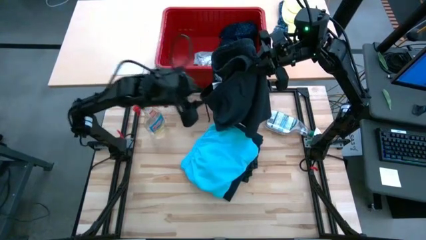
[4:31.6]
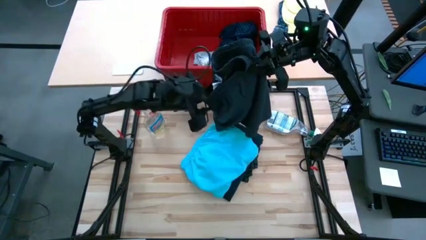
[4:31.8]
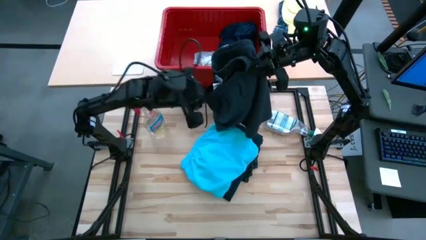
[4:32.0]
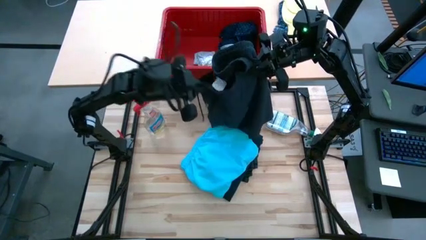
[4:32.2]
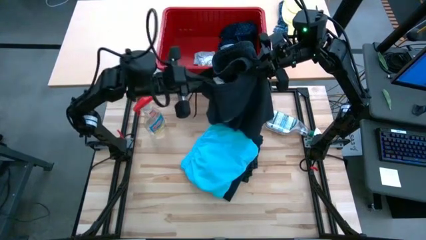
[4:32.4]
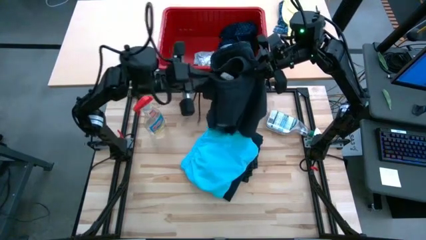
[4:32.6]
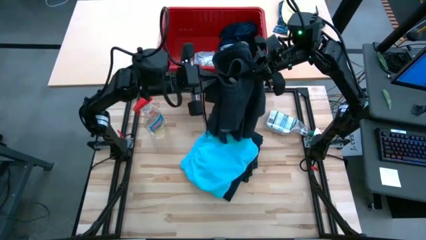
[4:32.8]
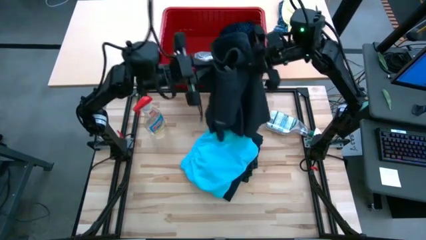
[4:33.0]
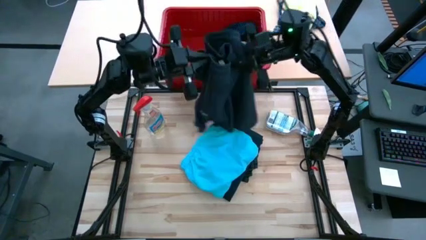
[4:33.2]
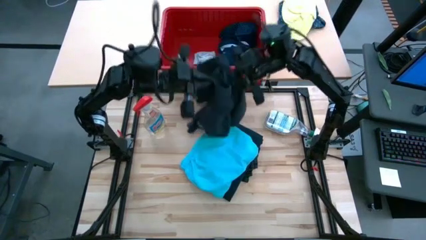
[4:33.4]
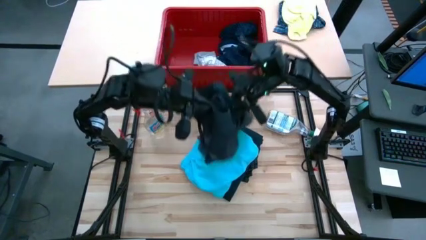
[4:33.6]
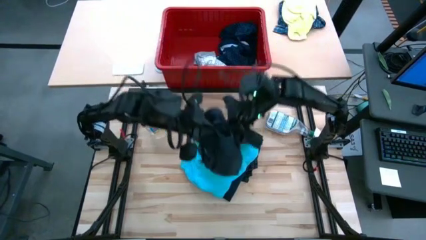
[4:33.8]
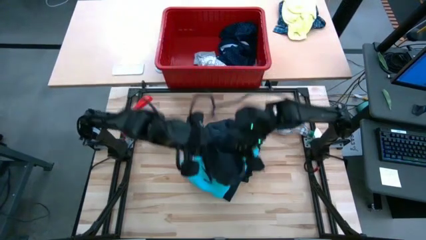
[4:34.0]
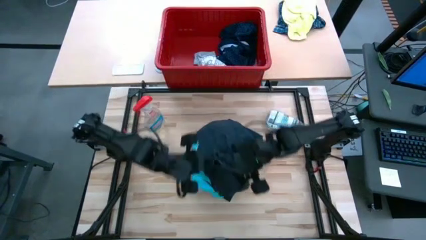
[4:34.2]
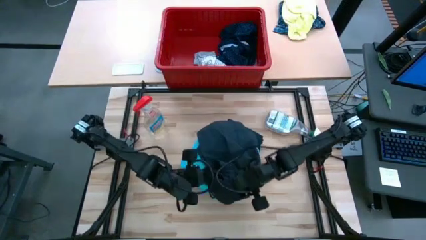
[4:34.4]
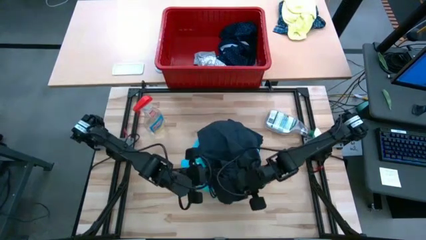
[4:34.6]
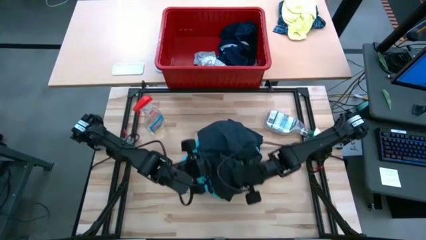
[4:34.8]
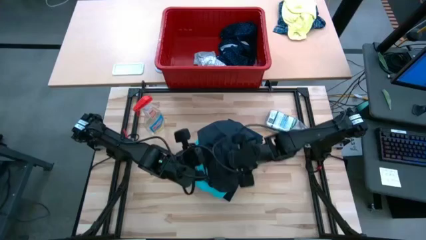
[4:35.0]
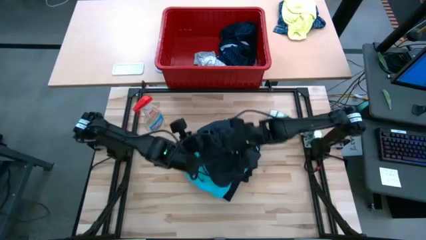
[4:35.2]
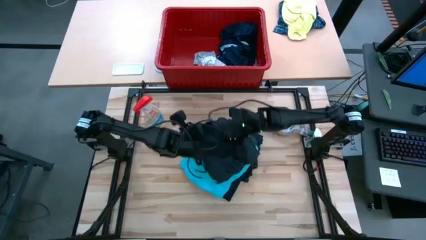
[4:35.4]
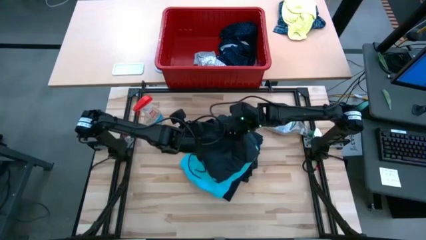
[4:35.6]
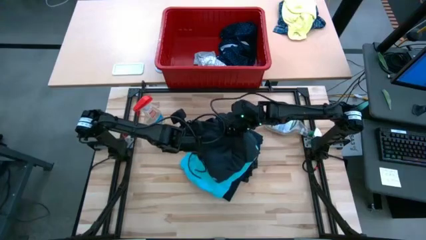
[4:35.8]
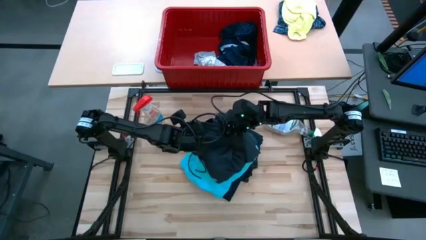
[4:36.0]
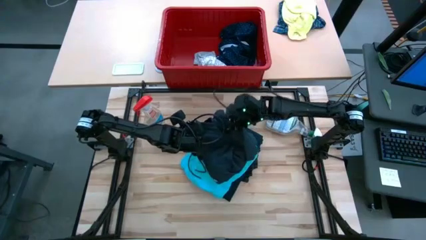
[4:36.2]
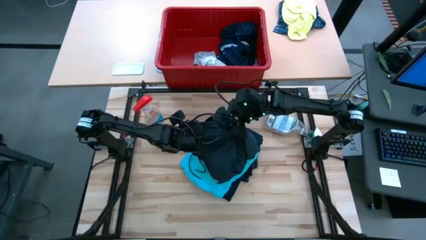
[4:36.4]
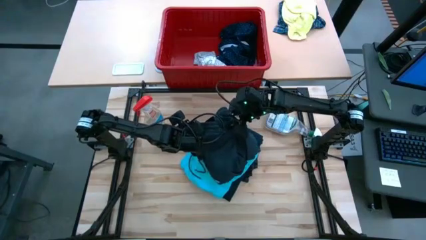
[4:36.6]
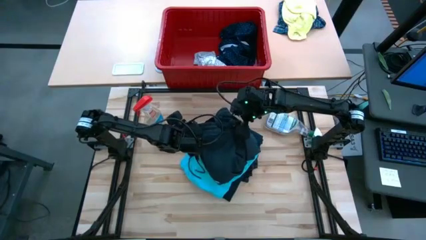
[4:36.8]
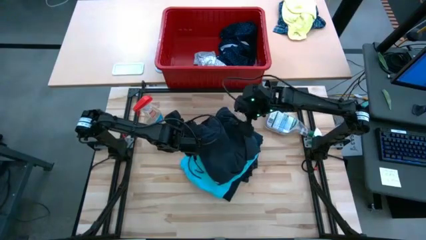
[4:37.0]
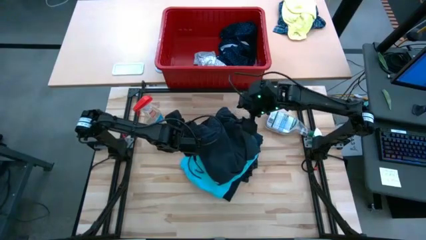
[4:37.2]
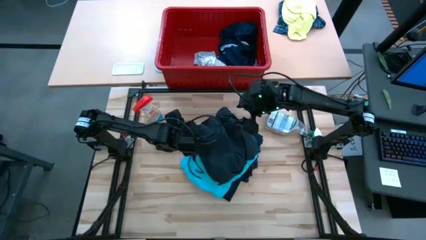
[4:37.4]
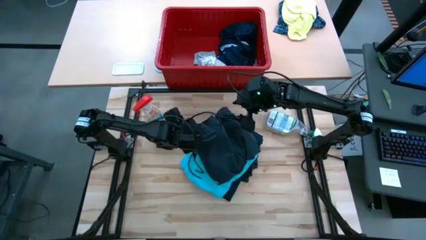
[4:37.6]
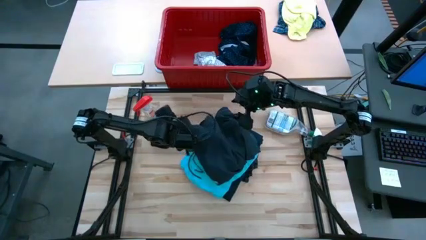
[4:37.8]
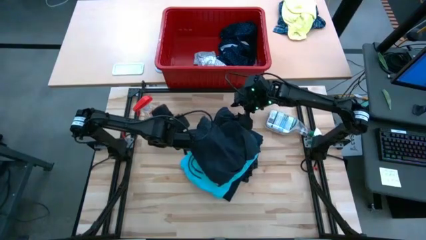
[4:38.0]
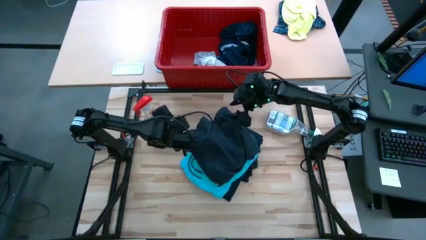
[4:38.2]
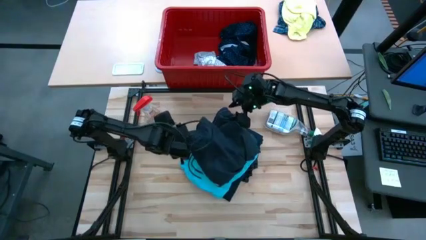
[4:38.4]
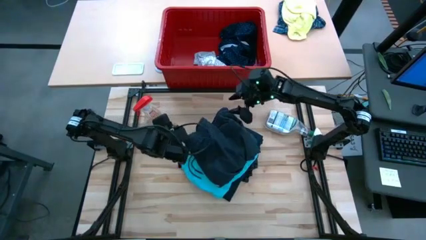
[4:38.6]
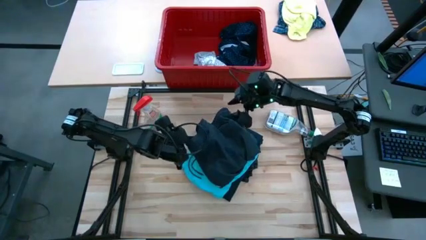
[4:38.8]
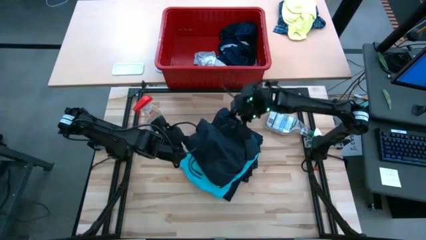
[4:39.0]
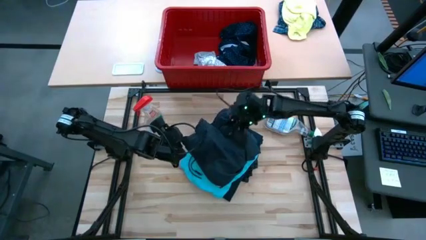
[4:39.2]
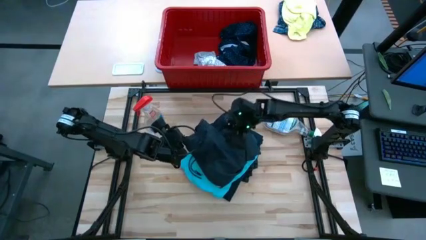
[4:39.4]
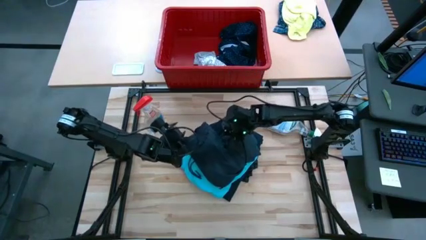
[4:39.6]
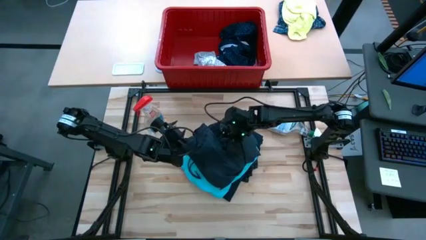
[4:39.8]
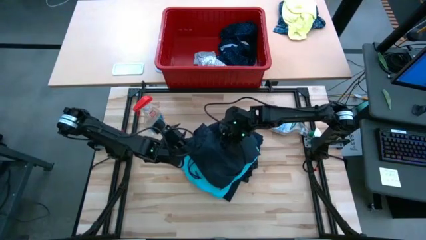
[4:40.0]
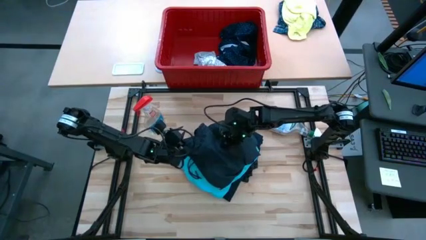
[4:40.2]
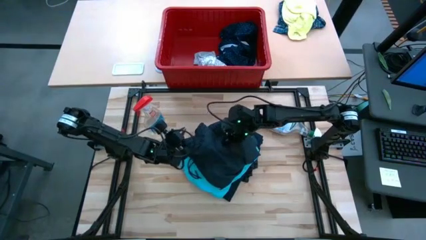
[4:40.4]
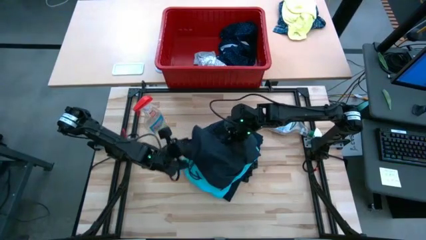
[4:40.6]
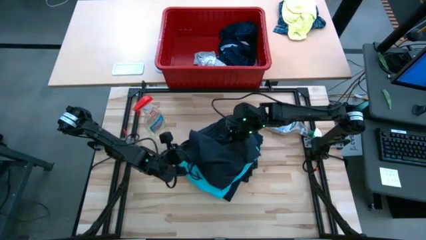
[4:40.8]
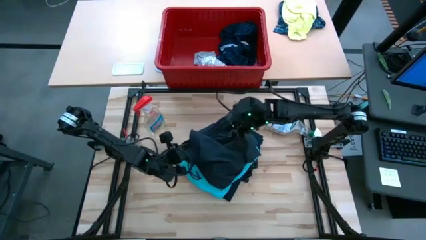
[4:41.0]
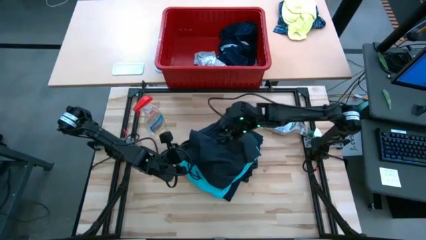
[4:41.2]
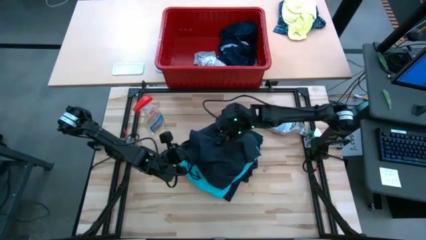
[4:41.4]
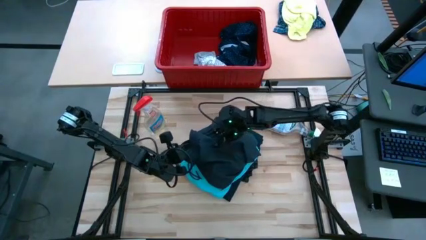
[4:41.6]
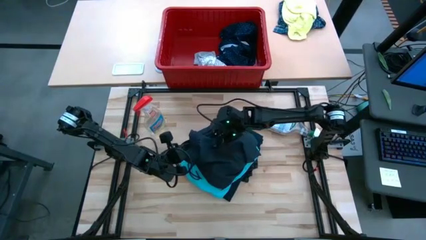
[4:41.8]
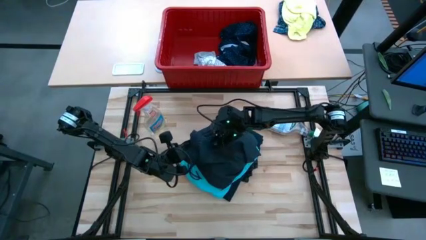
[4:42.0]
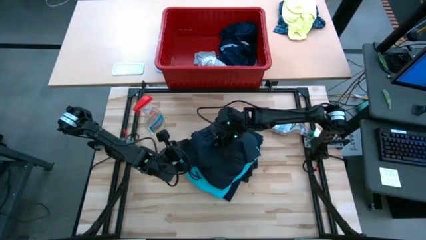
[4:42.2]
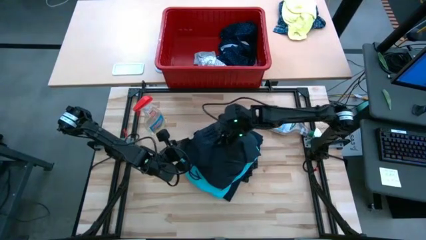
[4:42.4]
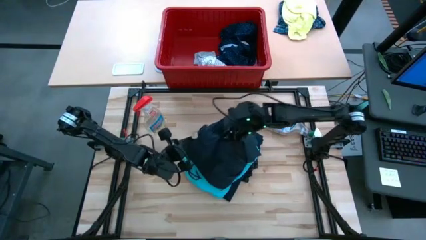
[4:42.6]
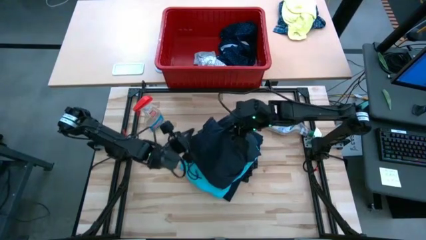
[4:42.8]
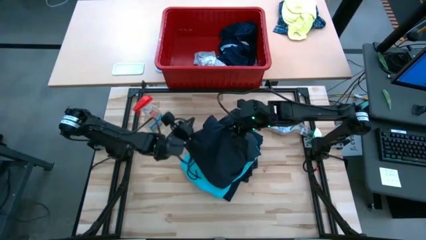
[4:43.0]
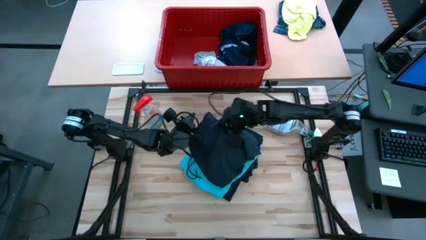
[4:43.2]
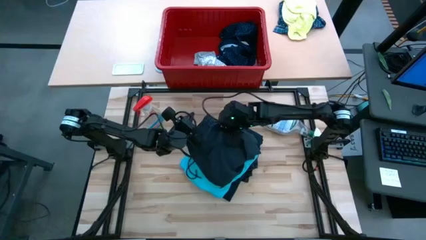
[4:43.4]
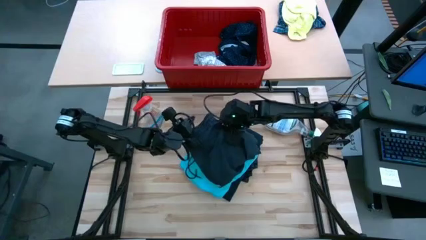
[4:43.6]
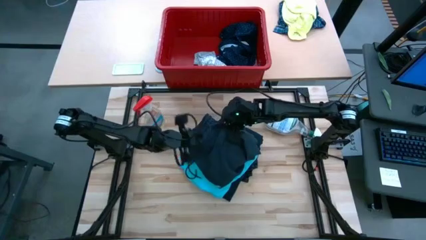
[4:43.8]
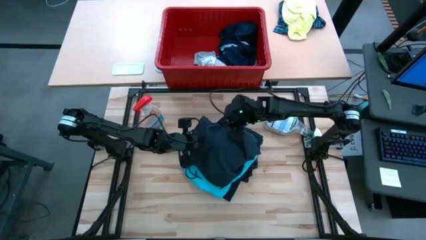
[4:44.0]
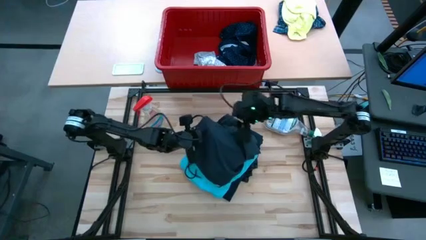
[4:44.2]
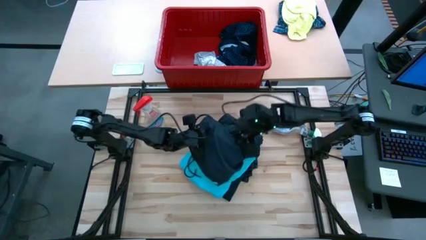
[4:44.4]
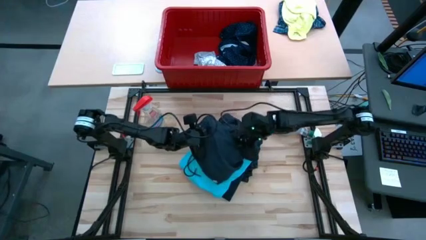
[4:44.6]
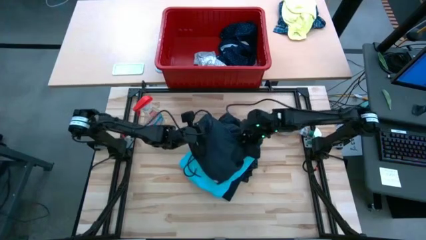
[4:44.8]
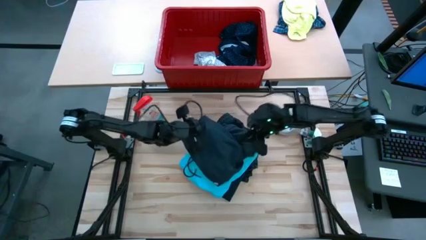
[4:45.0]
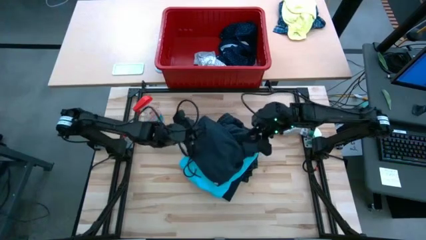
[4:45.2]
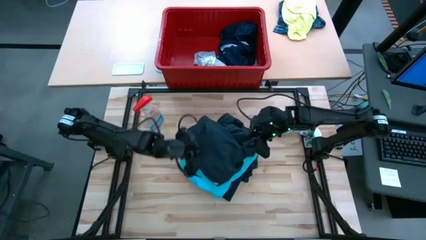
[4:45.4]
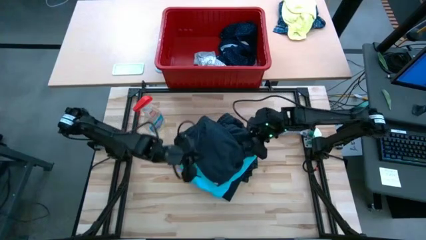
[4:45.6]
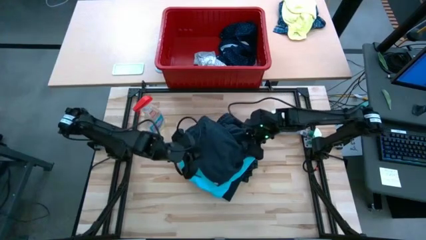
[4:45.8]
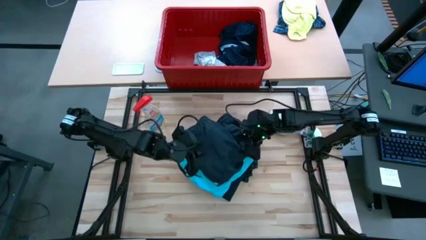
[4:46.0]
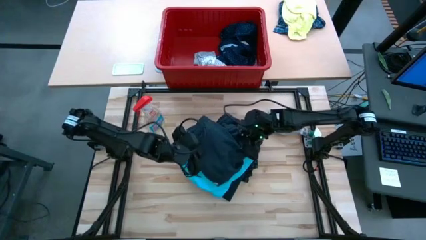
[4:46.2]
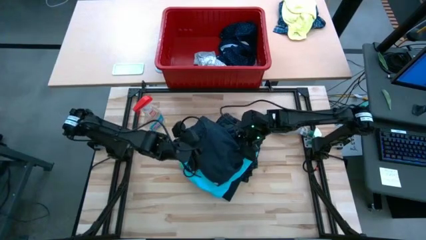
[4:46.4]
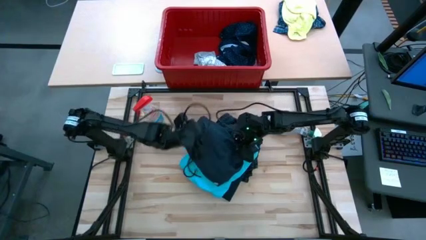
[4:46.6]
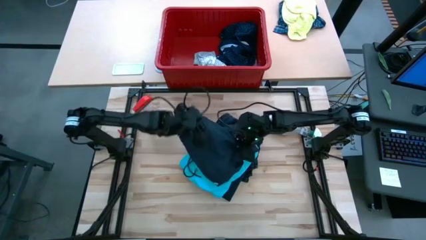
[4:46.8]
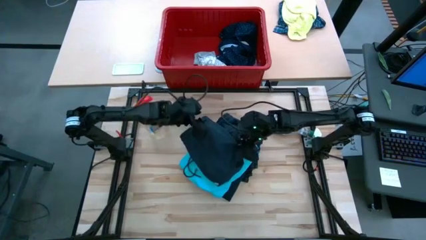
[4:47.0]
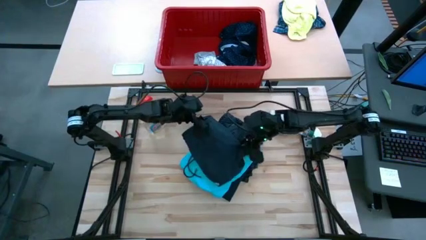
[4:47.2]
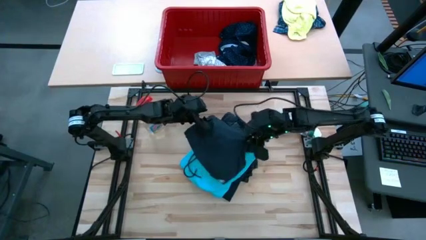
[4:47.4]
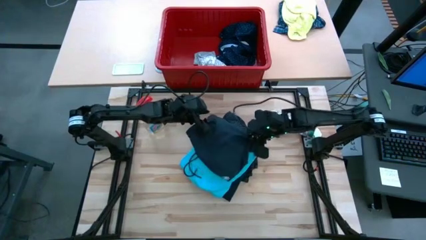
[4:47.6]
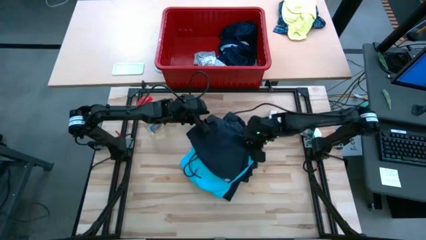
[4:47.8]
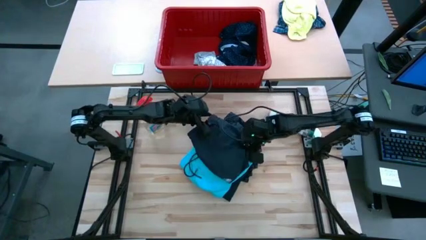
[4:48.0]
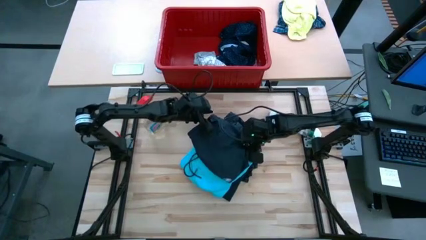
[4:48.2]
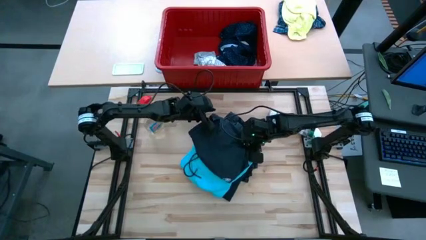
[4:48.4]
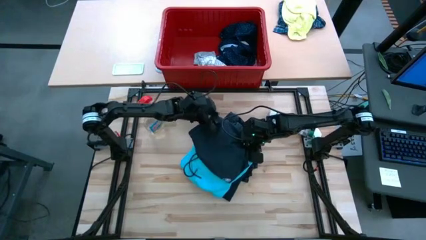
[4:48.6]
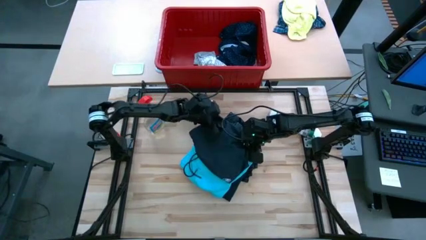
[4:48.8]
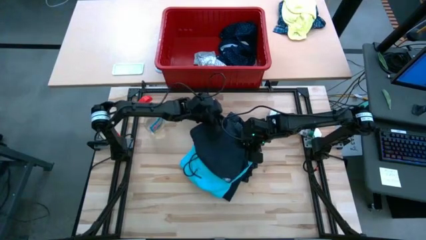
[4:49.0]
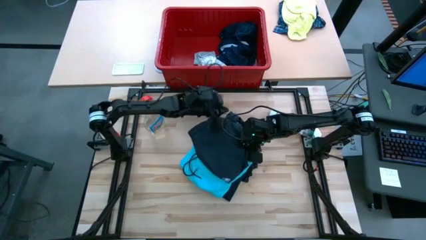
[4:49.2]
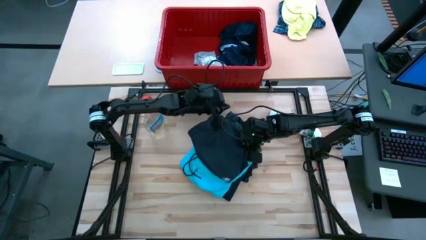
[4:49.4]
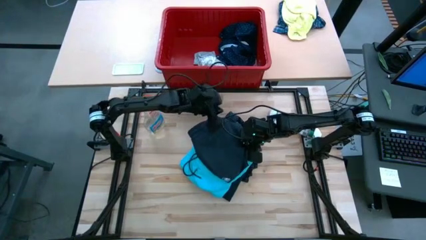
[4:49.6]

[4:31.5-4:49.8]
Task: Fold Laundry from Bin
Fold the black shorts
